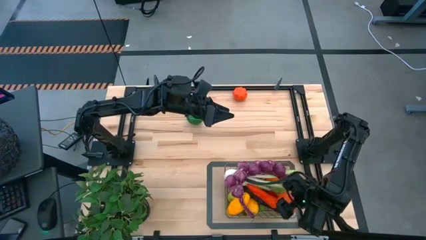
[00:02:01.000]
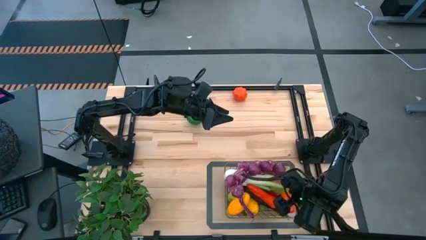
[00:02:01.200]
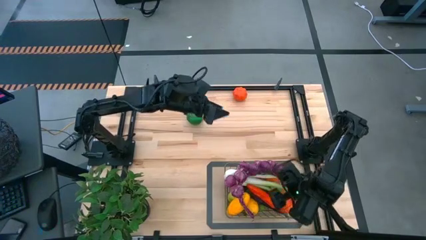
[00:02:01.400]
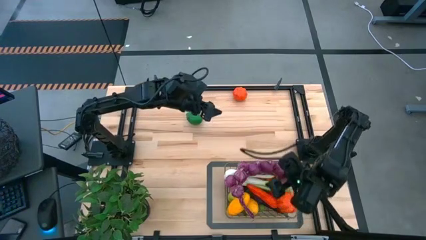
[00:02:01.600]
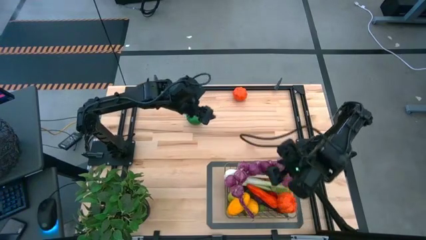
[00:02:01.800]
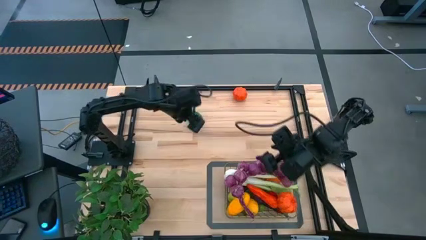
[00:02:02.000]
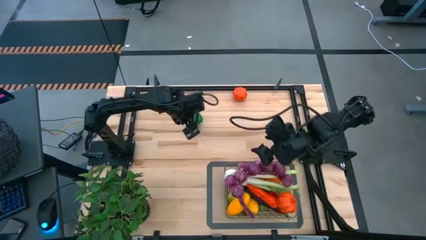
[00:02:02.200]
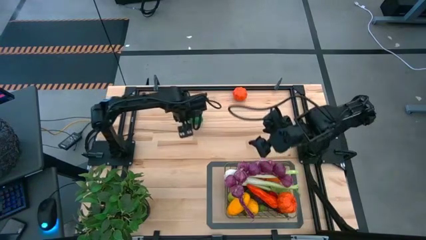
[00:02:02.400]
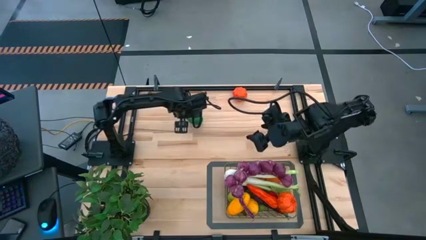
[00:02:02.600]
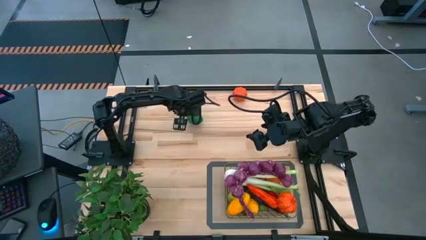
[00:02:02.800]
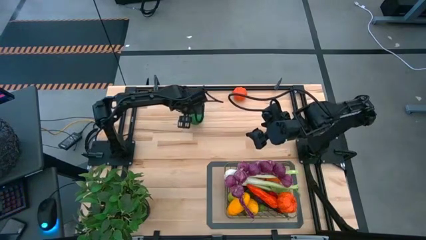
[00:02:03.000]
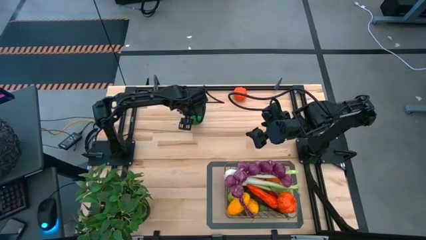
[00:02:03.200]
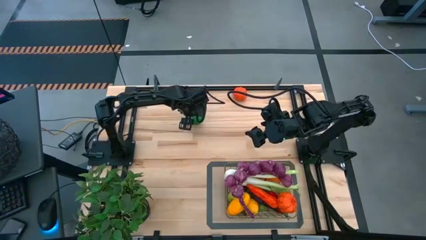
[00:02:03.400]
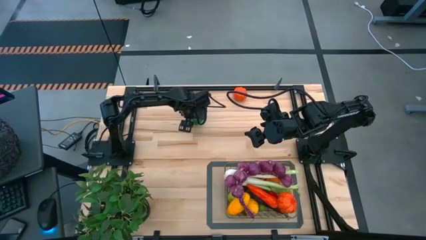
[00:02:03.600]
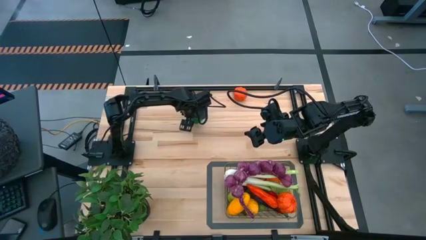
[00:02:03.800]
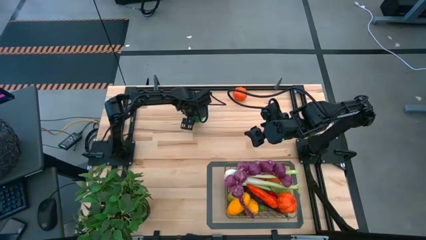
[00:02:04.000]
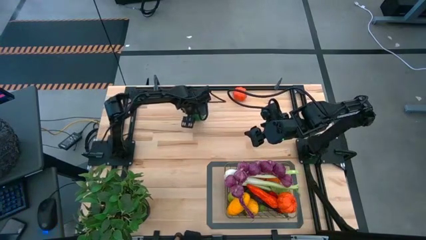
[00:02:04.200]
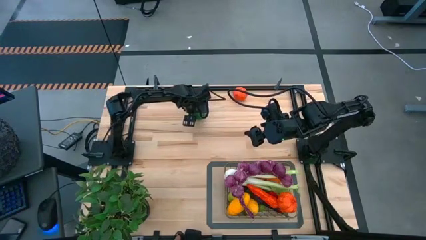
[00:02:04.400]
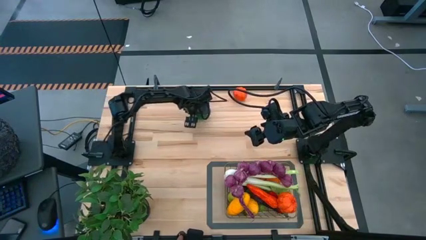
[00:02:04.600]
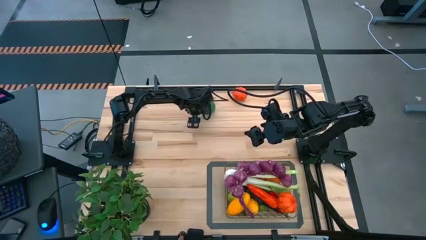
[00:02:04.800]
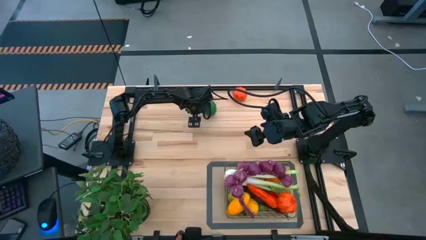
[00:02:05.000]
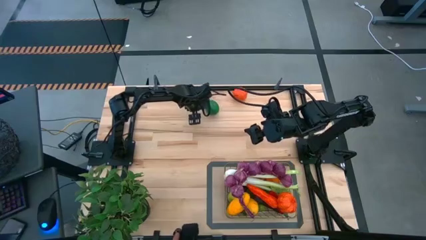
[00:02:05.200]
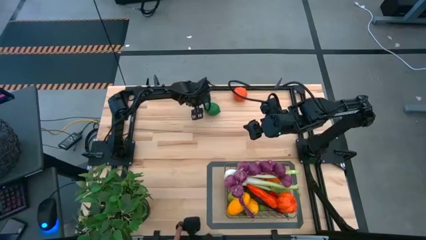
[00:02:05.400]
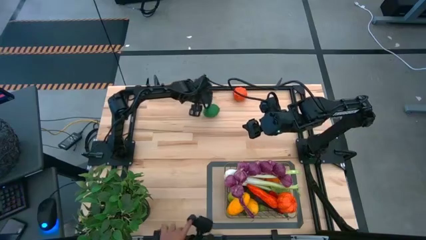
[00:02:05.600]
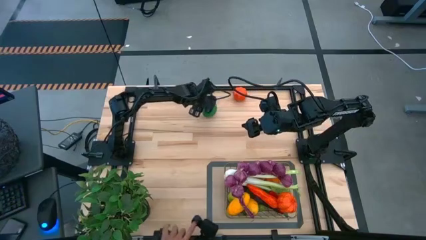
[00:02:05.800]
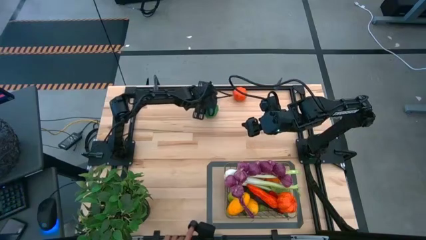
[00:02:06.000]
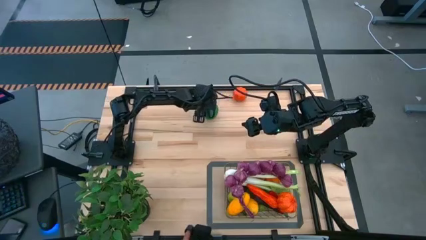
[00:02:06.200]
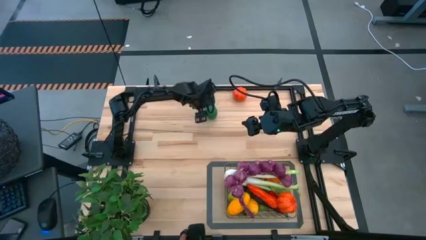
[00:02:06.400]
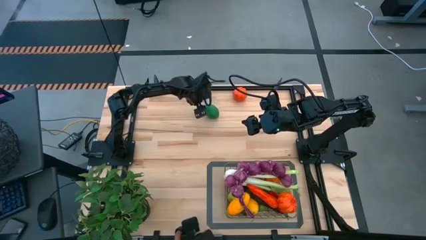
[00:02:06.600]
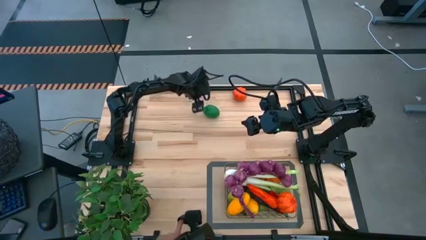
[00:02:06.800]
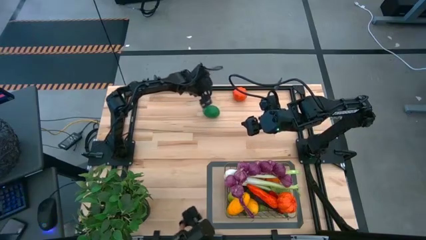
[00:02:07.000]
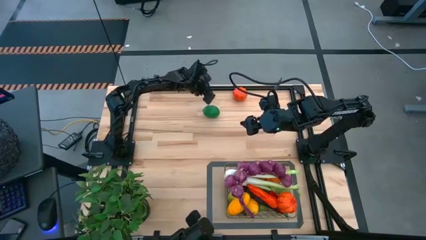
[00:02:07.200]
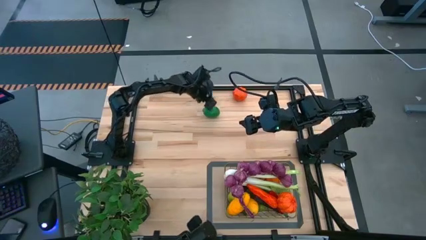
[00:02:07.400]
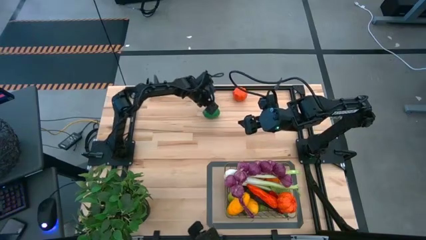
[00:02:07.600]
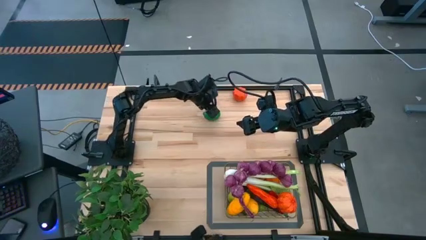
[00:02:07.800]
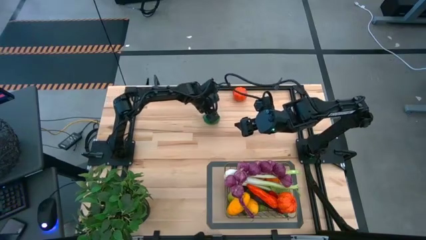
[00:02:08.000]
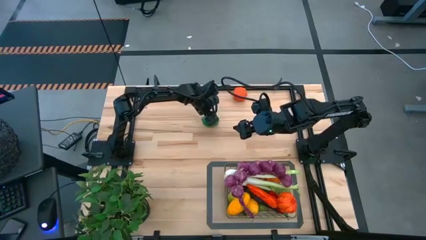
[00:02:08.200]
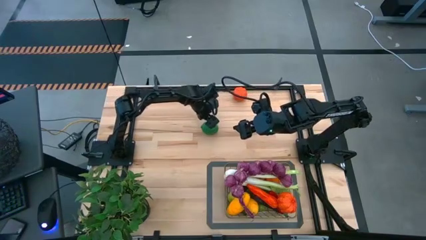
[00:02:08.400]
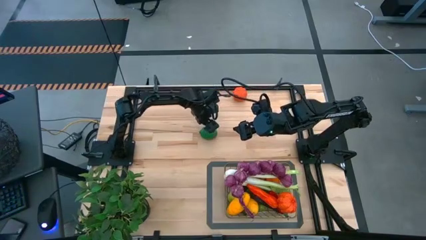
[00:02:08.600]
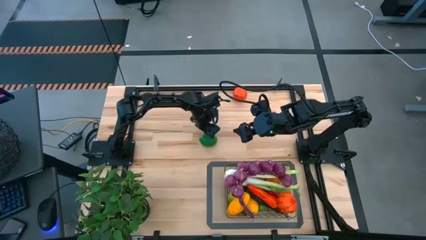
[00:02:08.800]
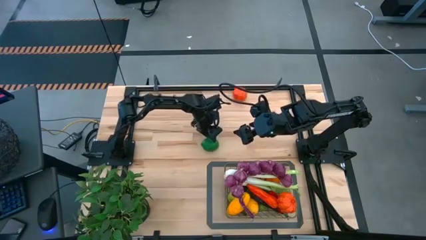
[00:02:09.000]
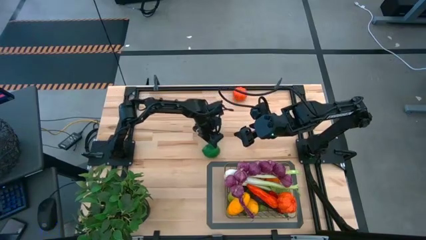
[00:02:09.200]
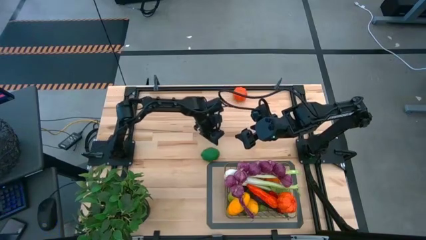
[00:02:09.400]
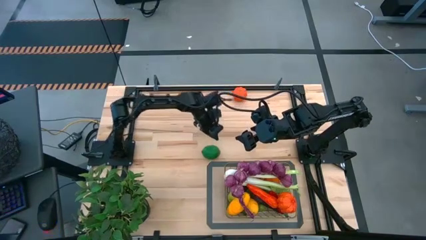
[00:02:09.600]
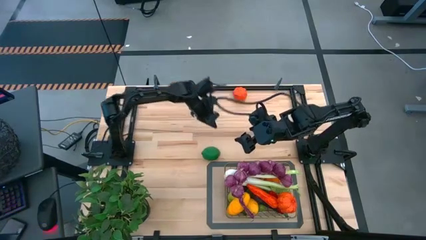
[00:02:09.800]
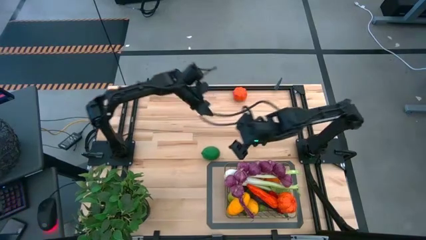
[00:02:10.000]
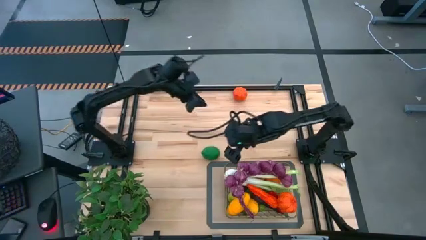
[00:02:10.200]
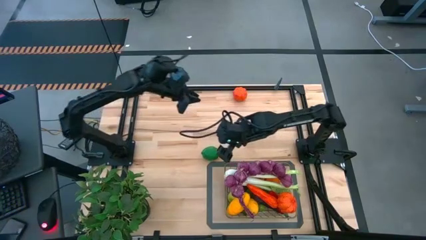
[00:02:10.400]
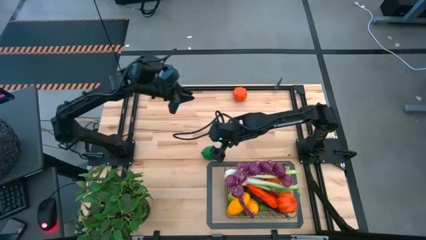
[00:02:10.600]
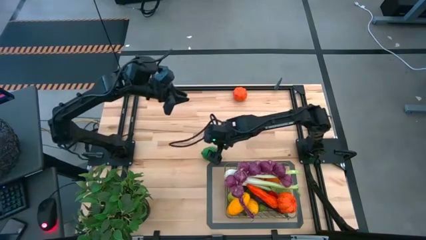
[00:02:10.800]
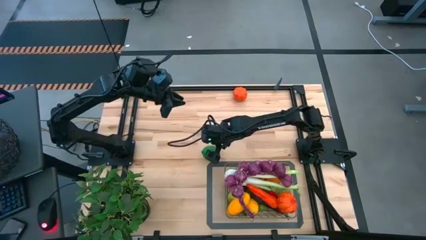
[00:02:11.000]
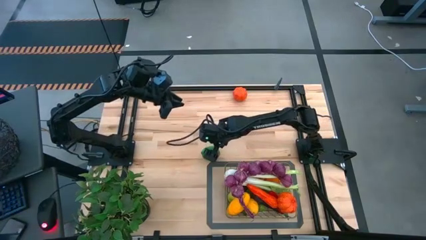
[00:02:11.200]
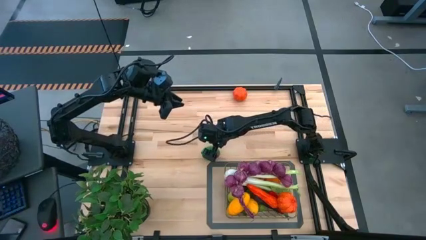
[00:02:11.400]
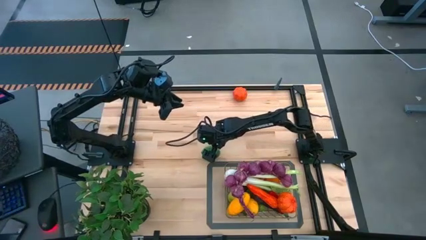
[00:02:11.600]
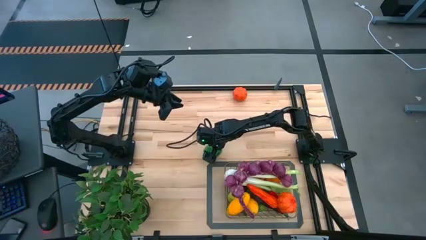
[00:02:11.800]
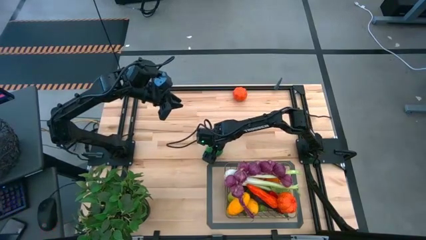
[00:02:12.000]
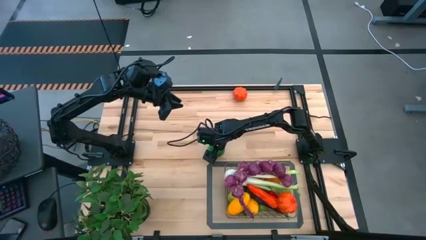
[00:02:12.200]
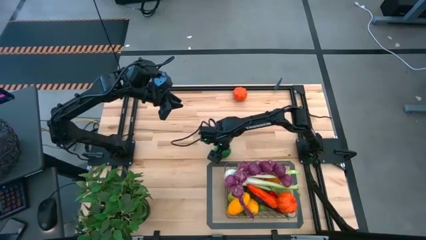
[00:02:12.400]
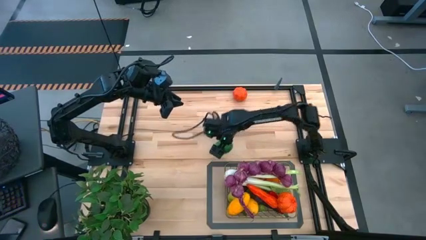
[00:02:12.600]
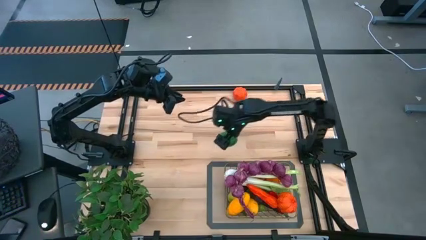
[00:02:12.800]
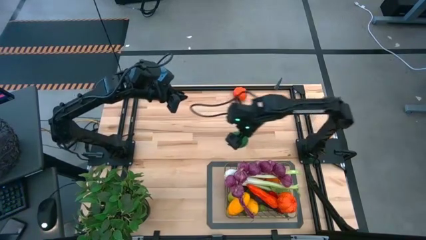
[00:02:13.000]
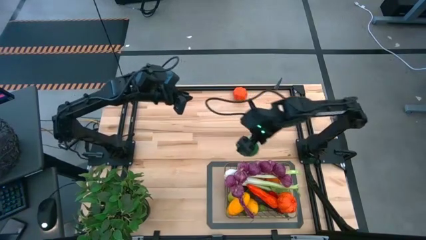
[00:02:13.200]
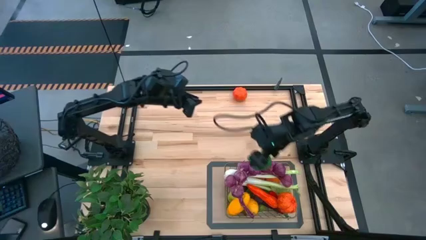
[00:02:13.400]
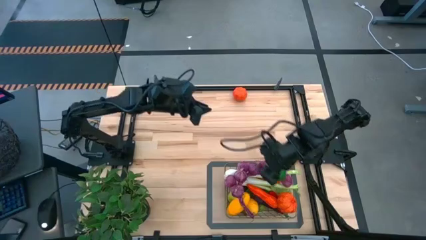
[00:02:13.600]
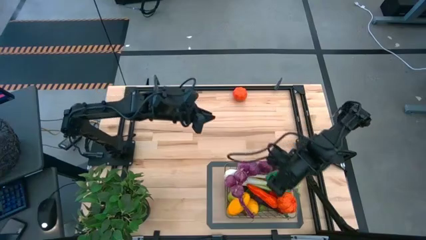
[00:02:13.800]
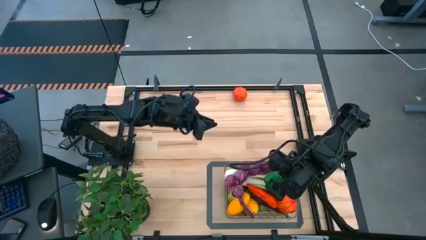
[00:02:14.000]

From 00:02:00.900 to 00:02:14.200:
Task: Build produce basket
Put the lime into the wire basket
